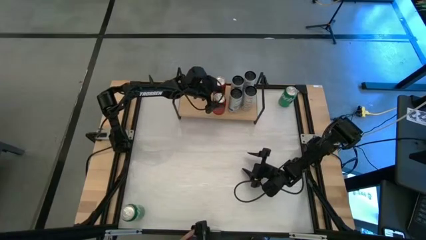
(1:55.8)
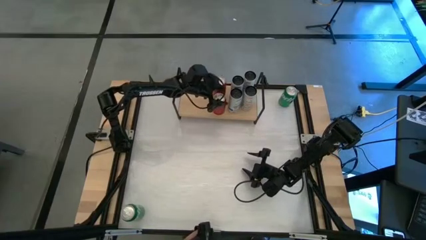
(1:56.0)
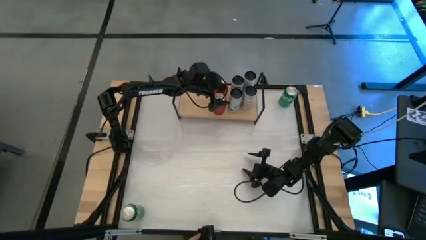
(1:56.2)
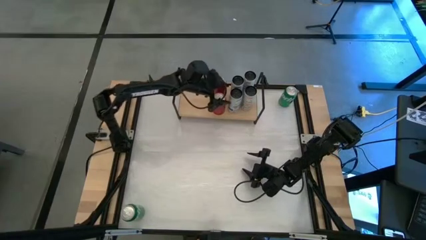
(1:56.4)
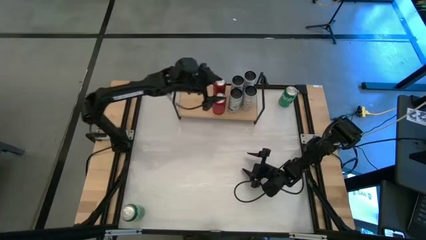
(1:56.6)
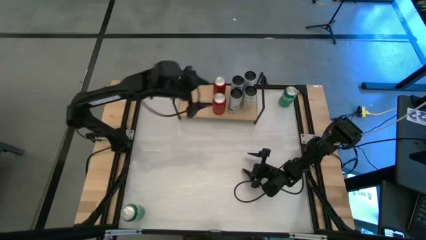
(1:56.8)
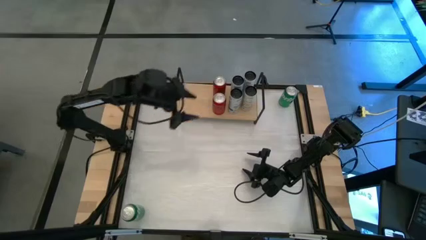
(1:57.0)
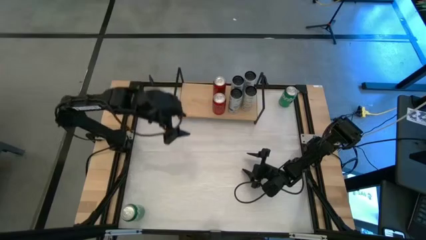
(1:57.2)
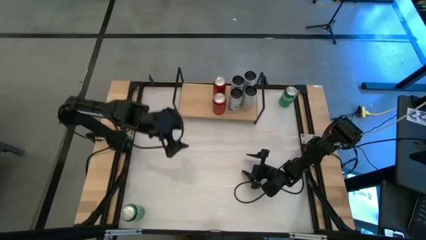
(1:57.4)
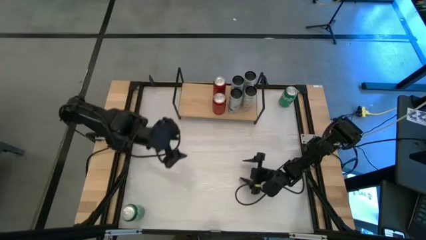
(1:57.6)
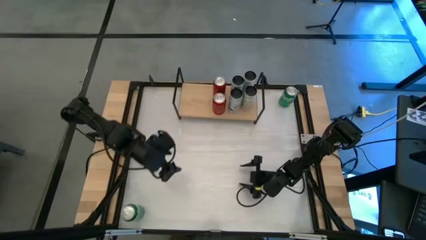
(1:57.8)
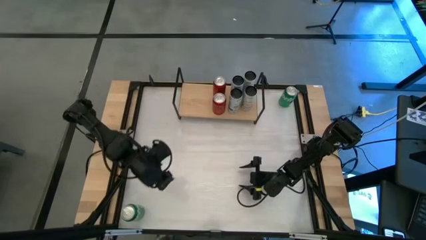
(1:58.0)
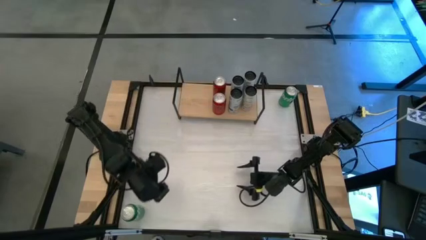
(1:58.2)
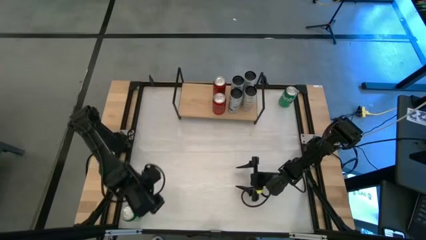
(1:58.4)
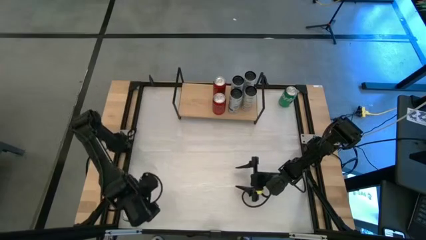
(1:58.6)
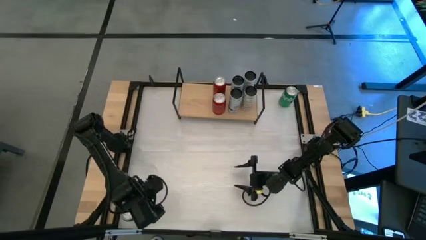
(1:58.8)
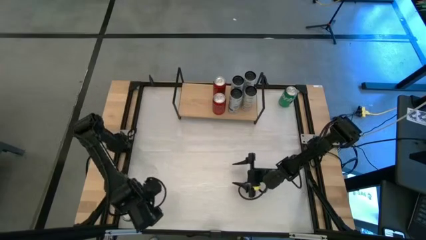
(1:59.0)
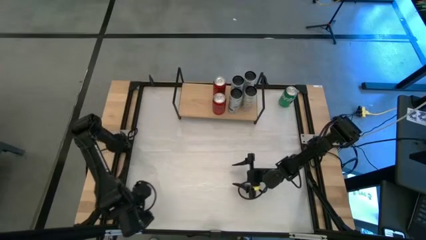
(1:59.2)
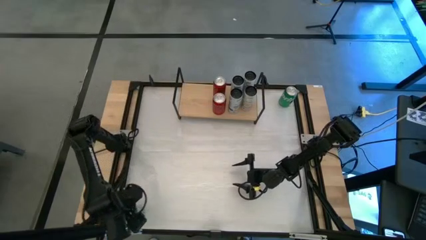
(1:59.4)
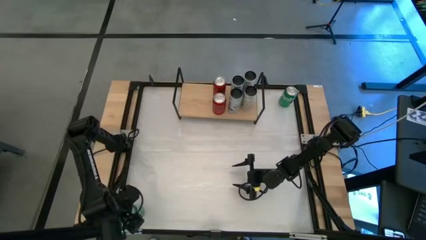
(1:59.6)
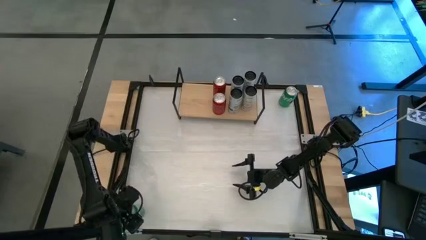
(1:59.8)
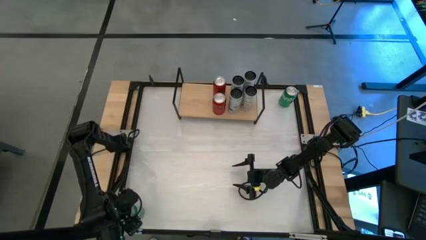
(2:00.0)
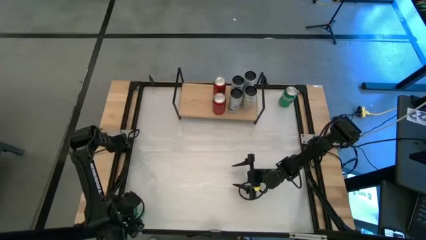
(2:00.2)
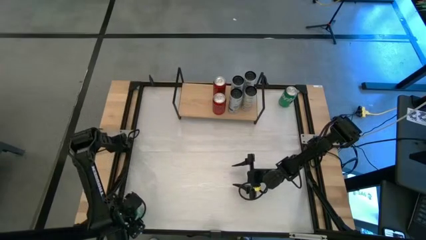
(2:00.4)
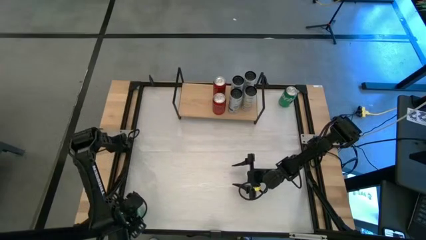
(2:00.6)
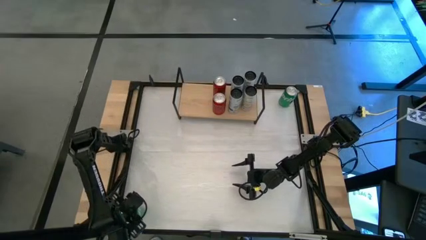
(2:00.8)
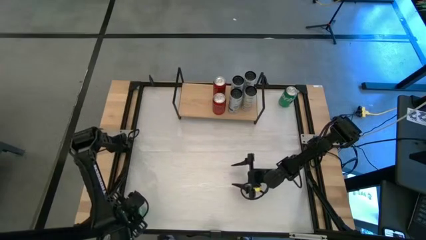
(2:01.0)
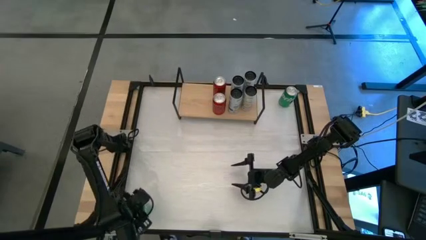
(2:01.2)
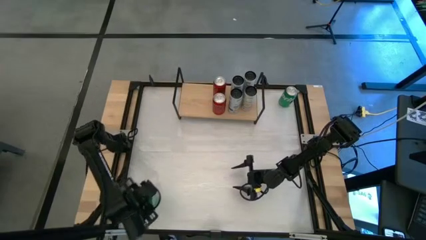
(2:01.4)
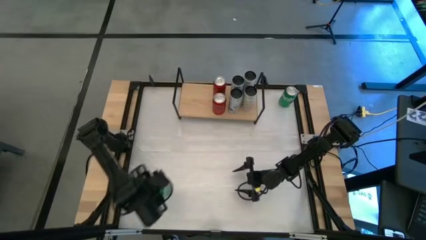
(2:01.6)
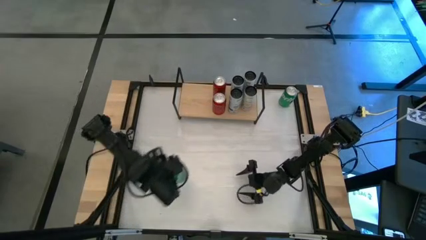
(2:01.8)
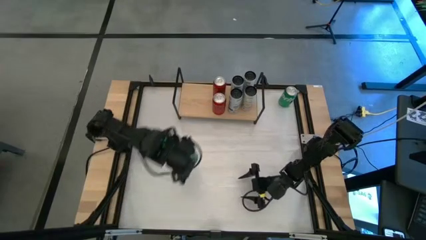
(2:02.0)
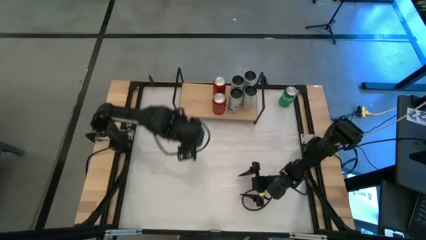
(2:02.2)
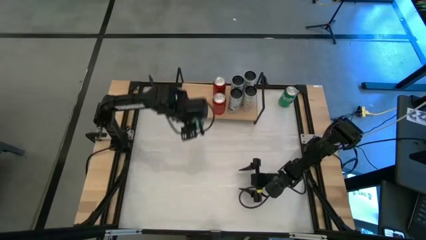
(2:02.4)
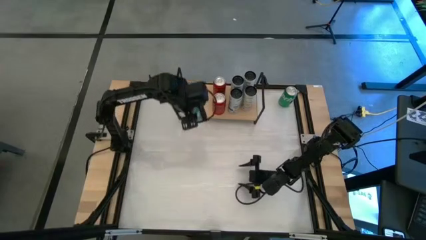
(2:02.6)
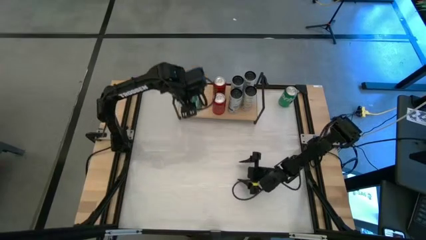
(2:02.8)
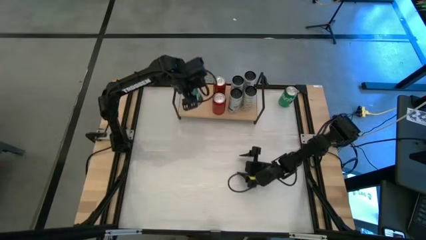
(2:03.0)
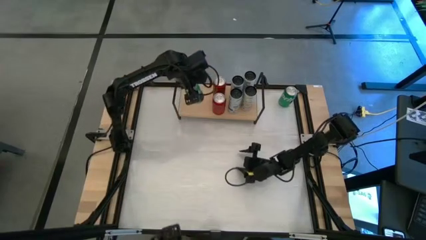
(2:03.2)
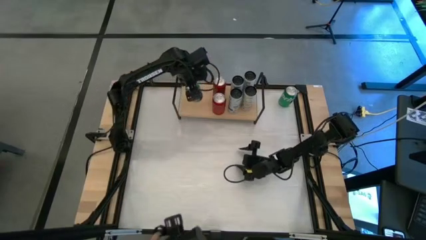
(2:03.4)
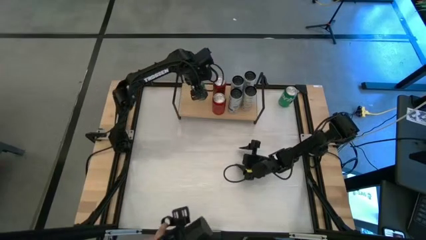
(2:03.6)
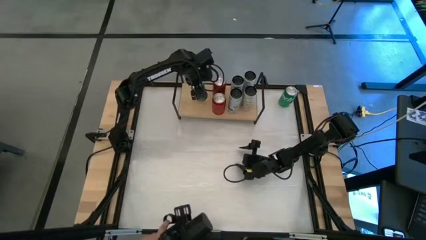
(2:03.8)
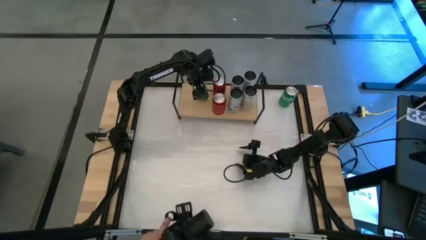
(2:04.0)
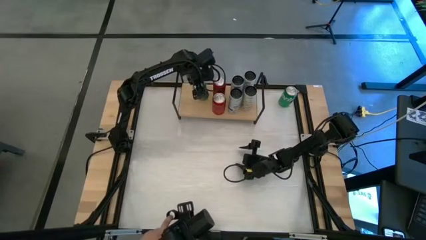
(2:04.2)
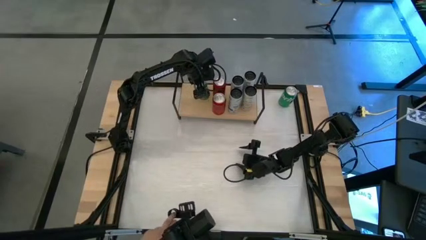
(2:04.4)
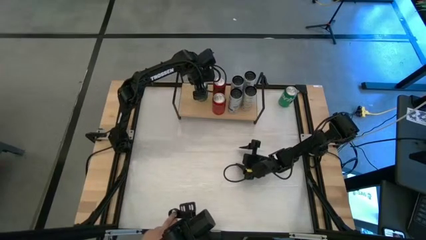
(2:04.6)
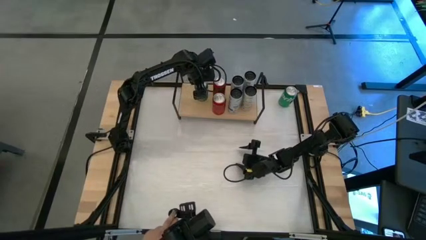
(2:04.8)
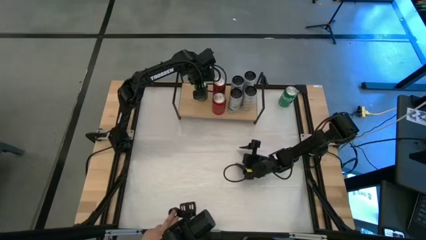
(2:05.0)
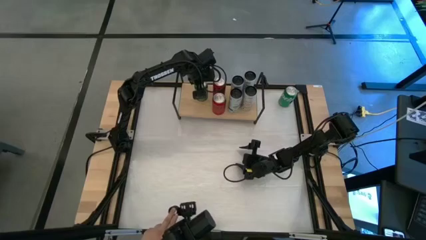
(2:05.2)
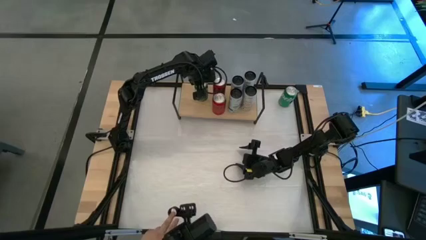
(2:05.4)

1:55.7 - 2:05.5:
Task: Place canned beverage on shelf
Put the bottom green soda can on the shelf

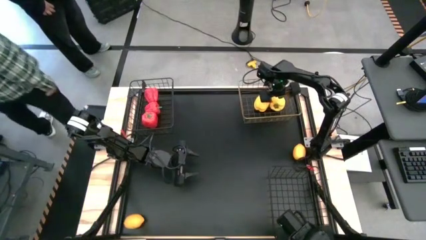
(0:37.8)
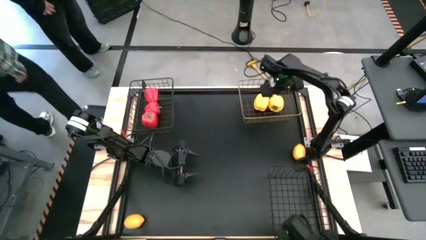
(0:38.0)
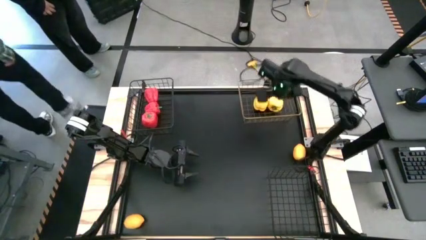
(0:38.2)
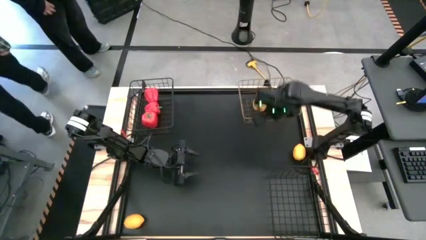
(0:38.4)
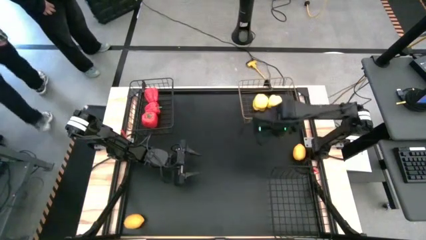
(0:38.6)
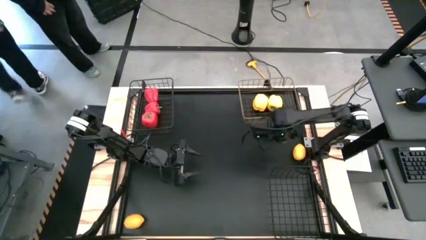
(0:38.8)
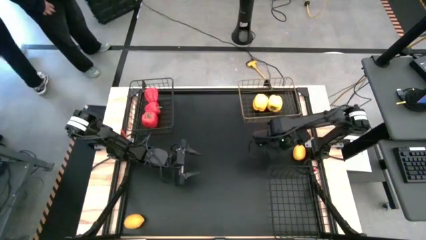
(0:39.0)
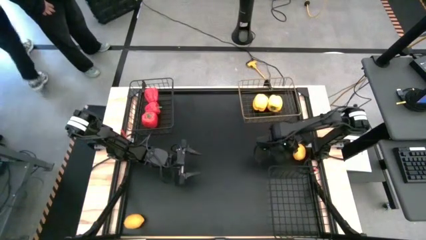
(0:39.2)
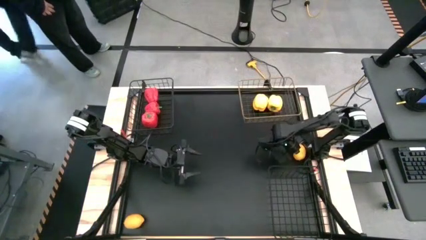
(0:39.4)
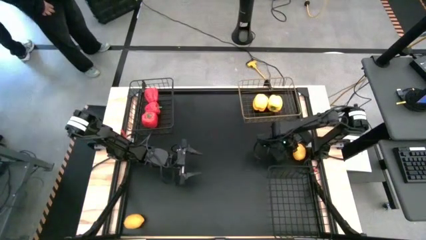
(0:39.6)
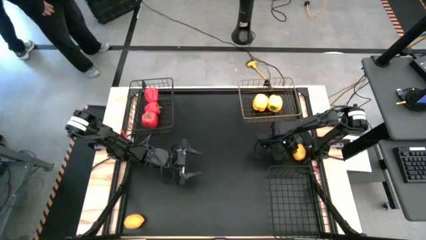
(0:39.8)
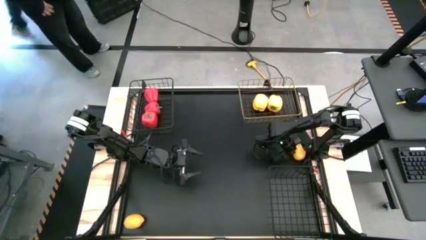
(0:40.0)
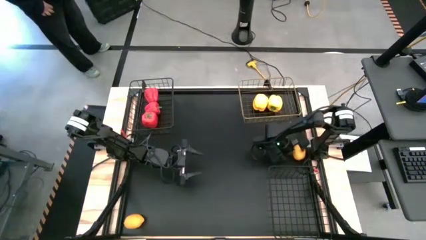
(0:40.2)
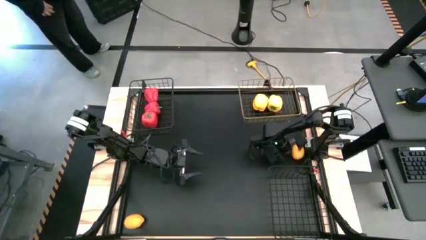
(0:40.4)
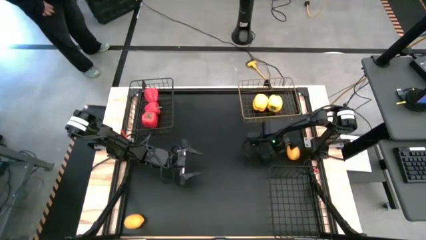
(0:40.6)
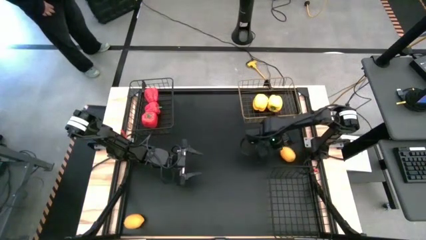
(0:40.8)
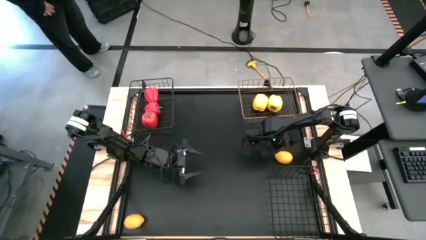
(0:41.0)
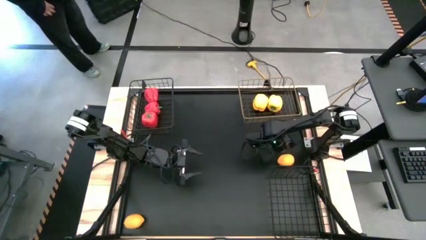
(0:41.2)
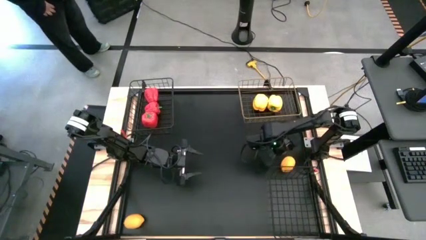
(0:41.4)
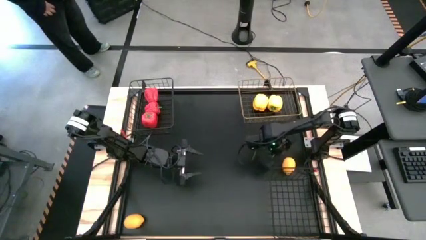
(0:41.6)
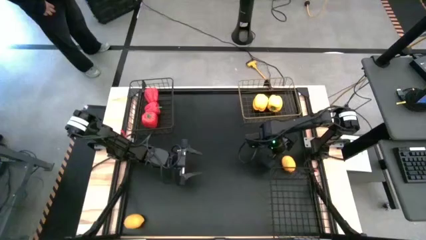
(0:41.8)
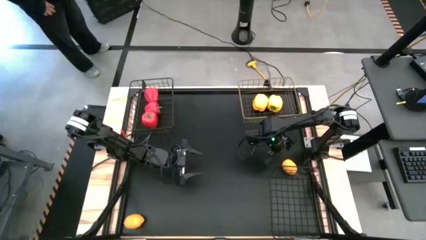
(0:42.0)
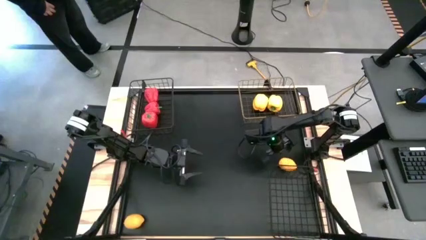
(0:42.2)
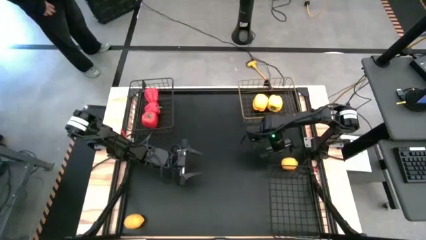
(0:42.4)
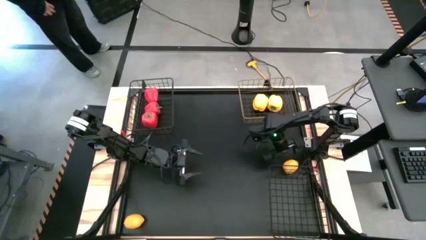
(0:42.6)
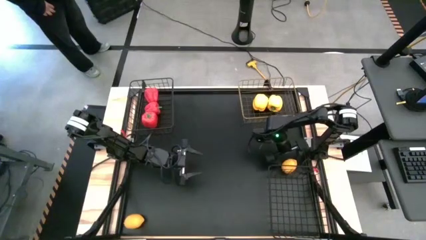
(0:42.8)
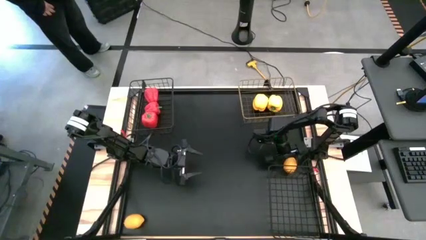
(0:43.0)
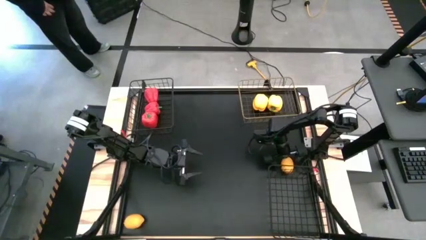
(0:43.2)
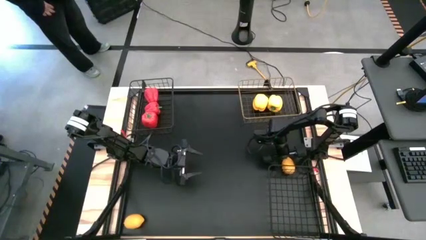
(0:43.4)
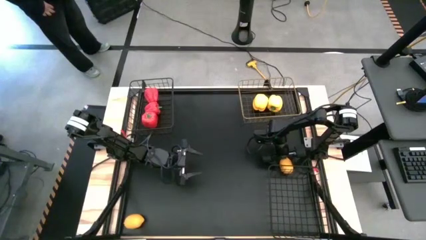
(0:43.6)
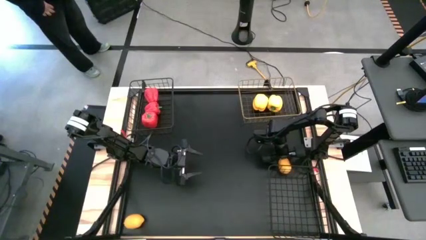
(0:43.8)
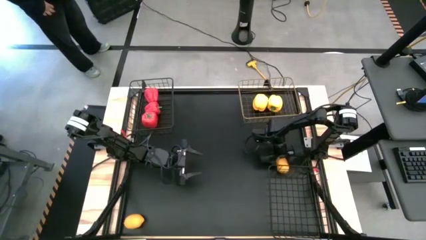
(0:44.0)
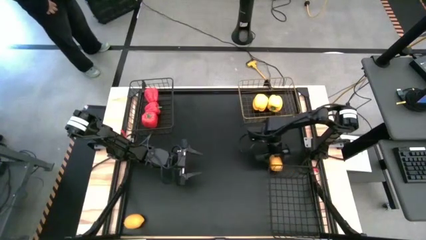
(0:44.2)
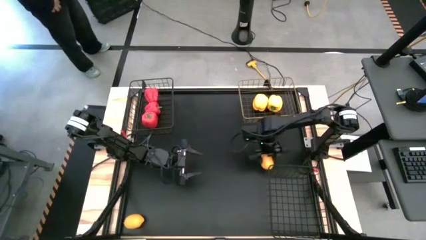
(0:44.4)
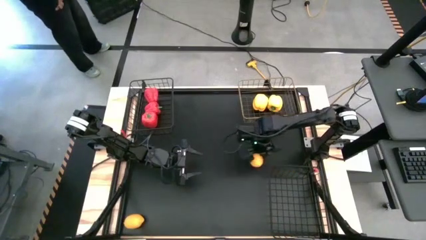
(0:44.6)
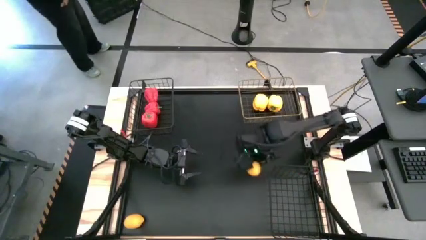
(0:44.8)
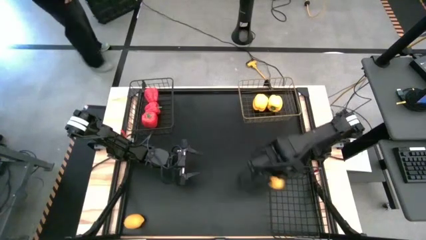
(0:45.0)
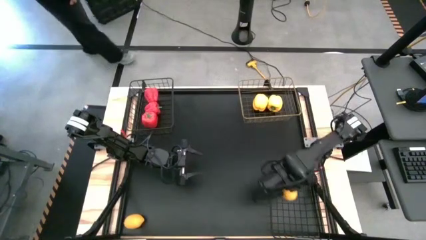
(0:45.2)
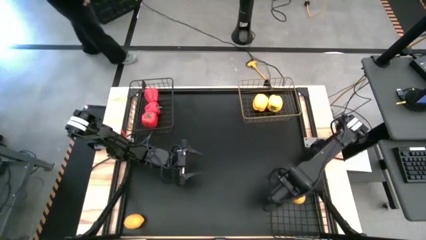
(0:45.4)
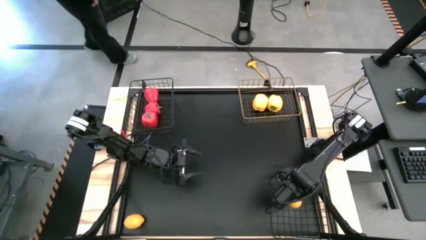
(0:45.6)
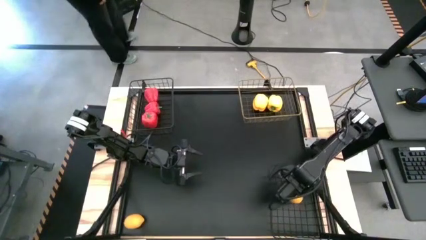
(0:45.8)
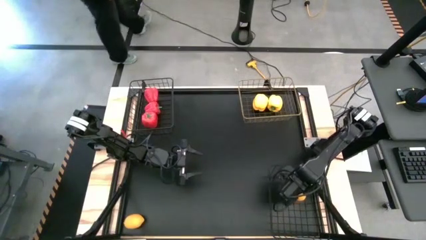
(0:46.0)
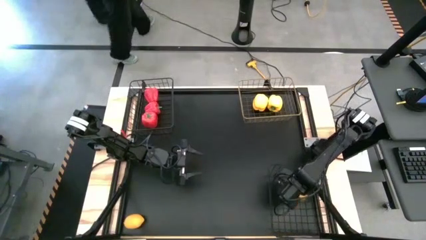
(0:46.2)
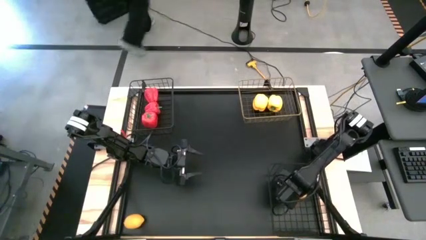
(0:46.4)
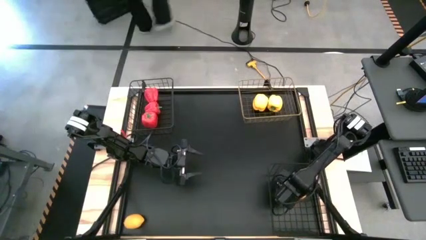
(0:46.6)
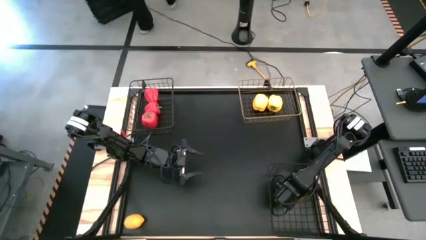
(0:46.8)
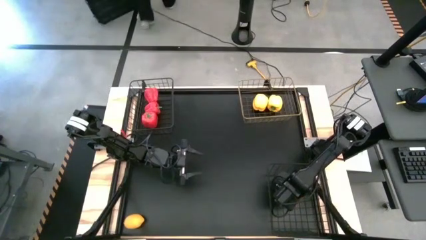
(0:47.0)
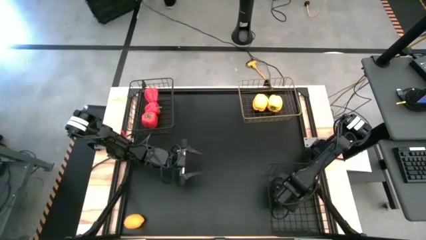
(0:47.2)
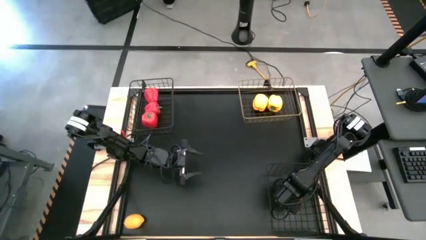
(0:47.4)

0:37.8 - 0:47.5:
Task: Sort produce into baskets
Put the top right yellow lemon into the bottom black mesh basket
